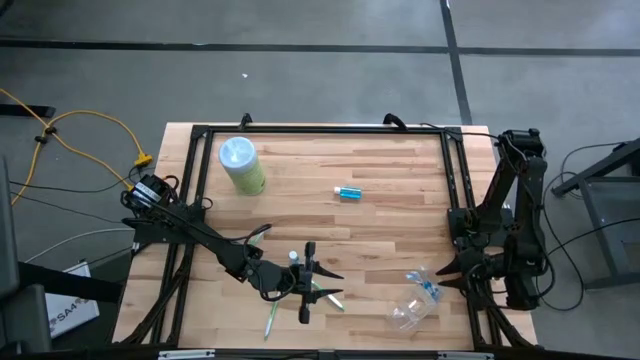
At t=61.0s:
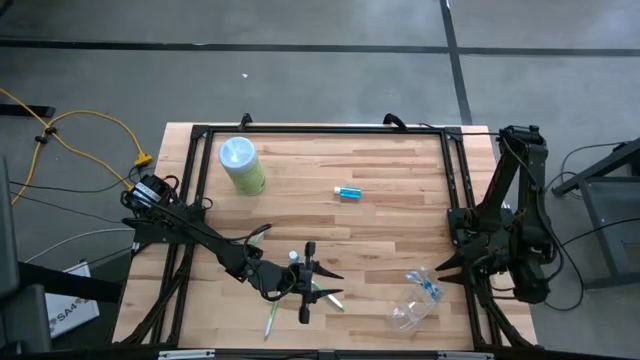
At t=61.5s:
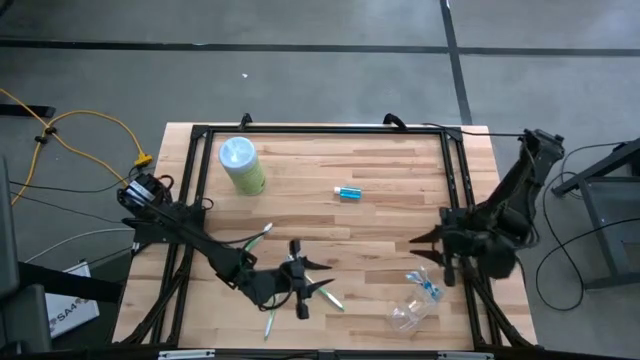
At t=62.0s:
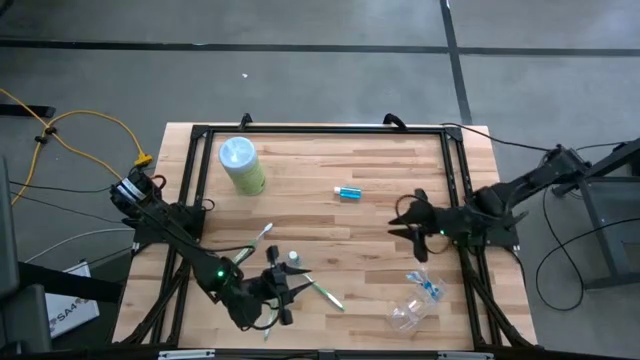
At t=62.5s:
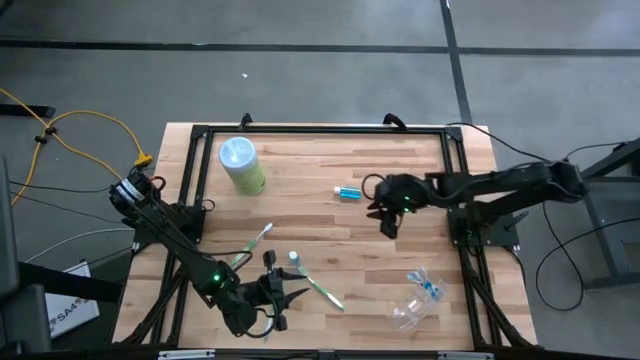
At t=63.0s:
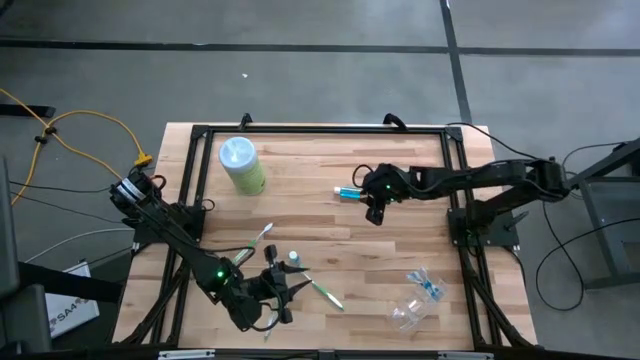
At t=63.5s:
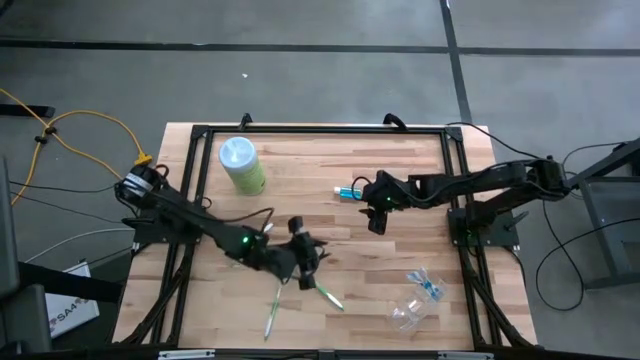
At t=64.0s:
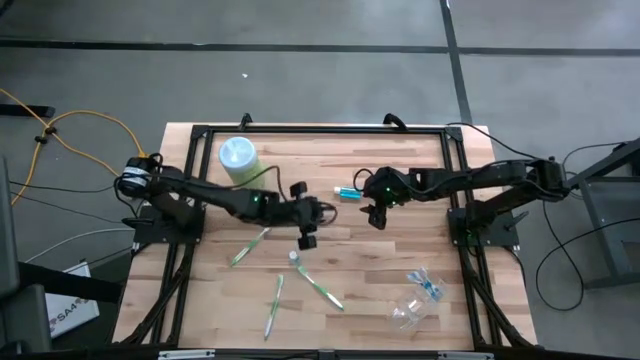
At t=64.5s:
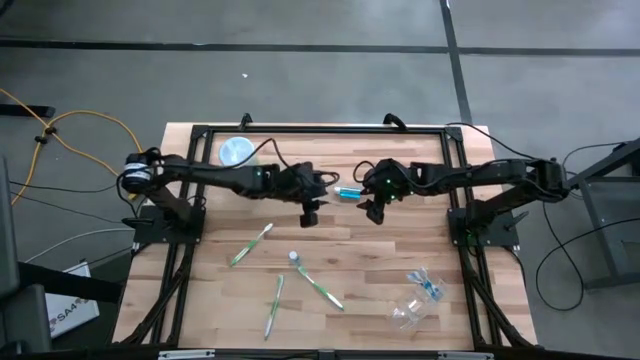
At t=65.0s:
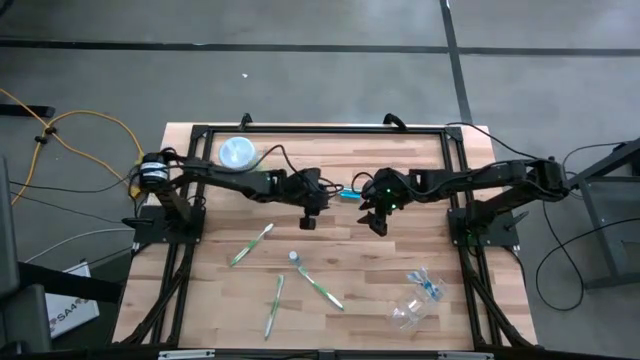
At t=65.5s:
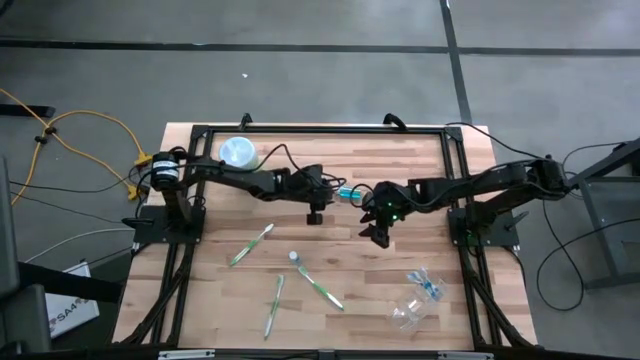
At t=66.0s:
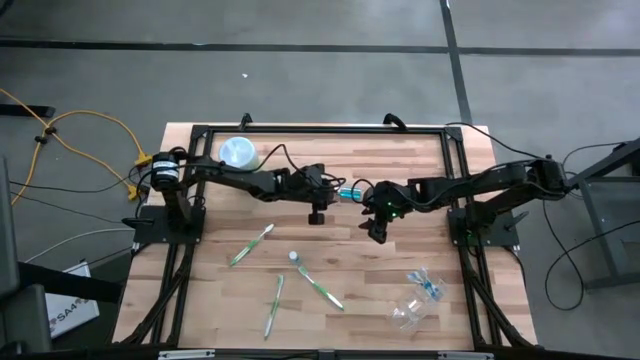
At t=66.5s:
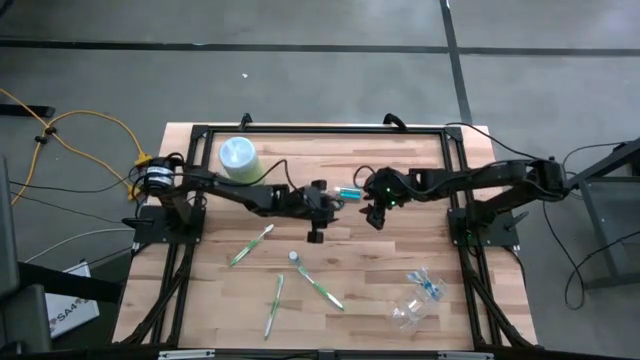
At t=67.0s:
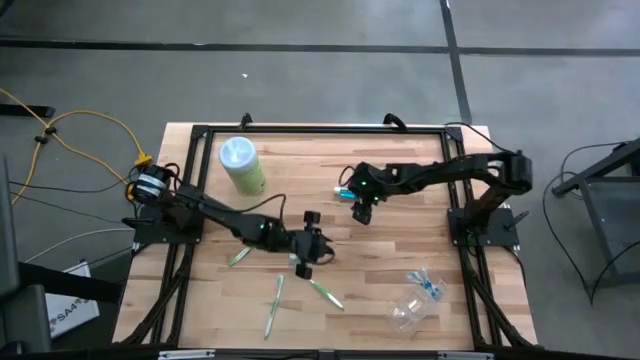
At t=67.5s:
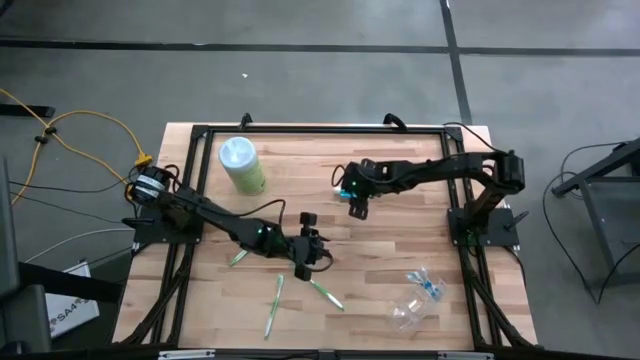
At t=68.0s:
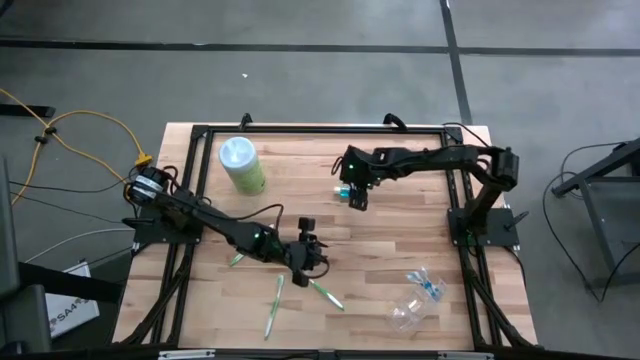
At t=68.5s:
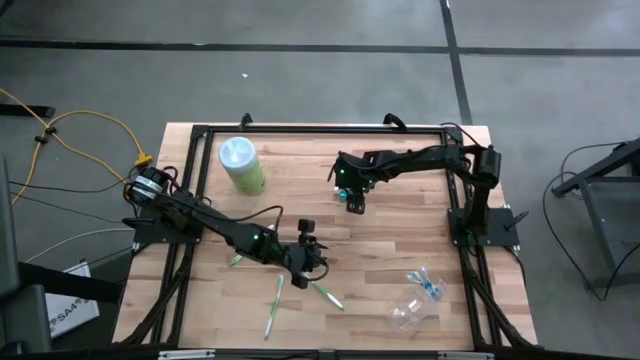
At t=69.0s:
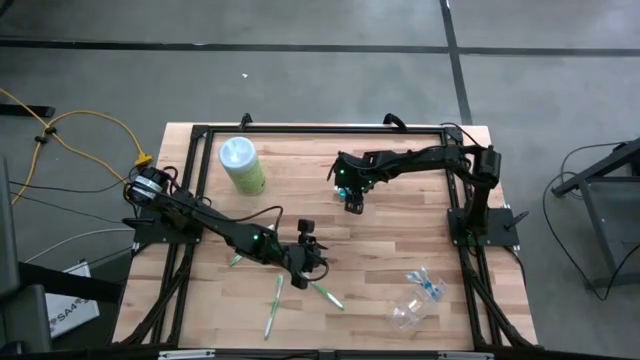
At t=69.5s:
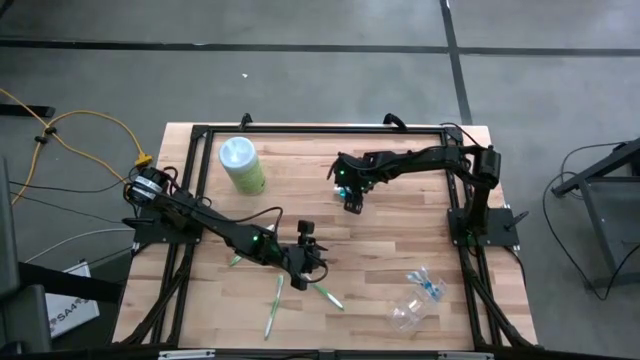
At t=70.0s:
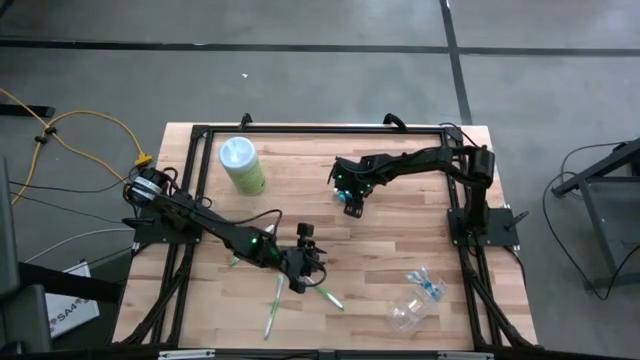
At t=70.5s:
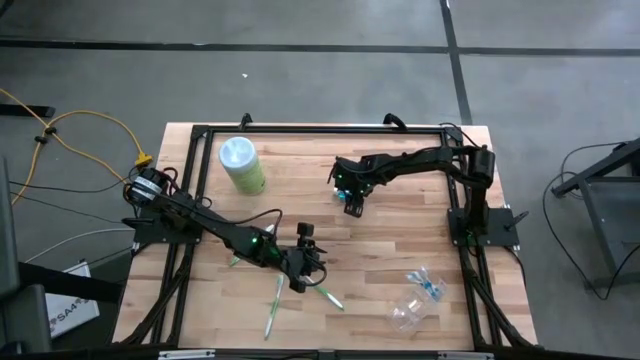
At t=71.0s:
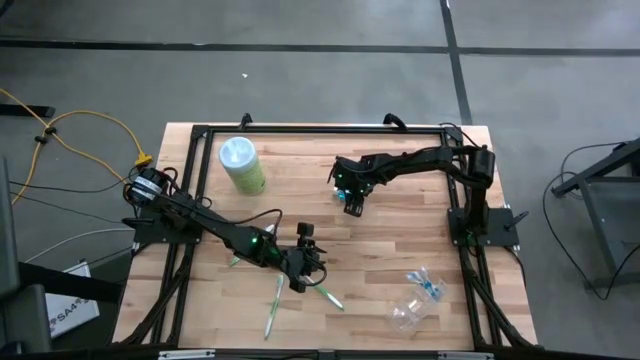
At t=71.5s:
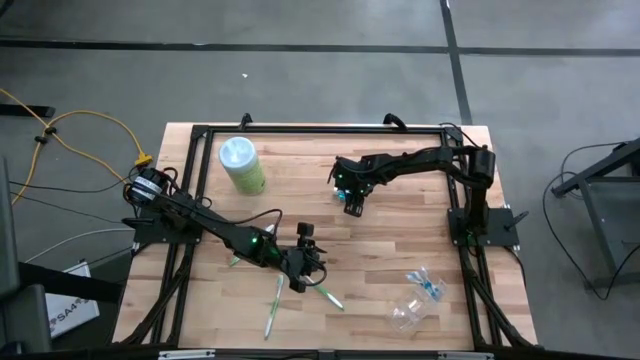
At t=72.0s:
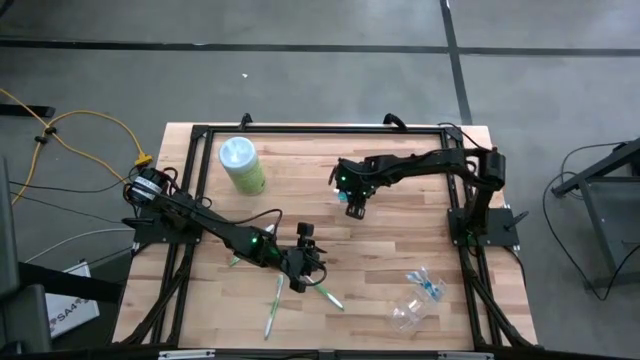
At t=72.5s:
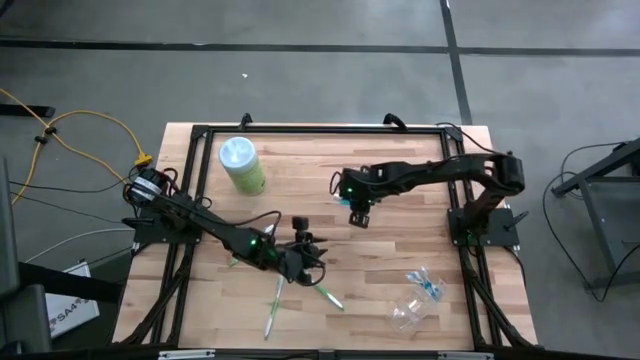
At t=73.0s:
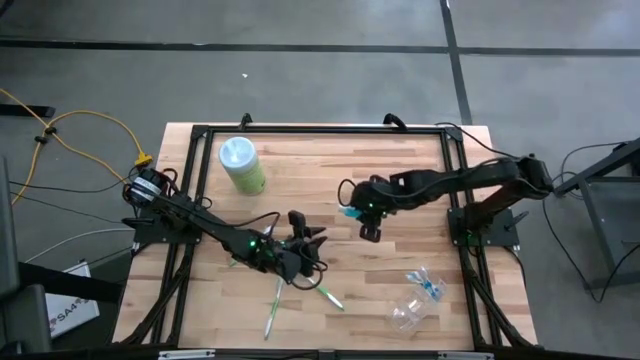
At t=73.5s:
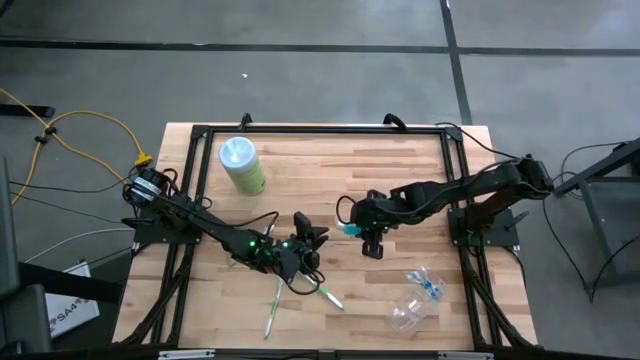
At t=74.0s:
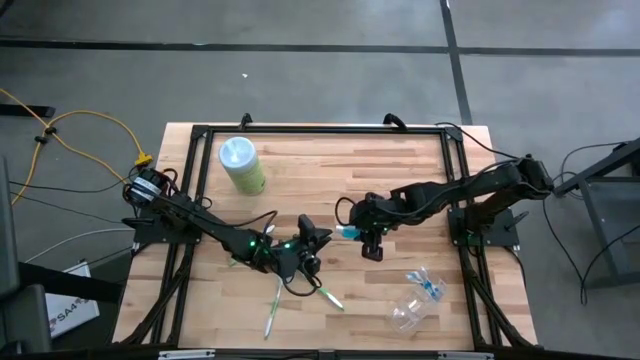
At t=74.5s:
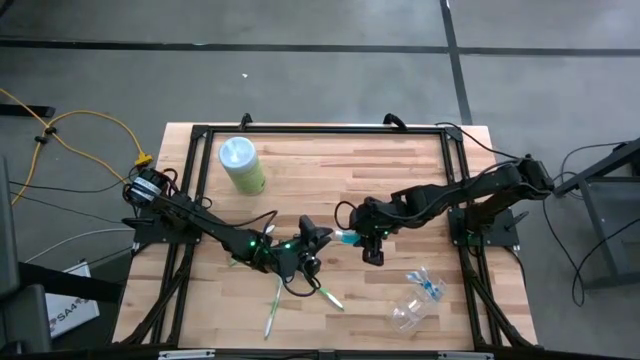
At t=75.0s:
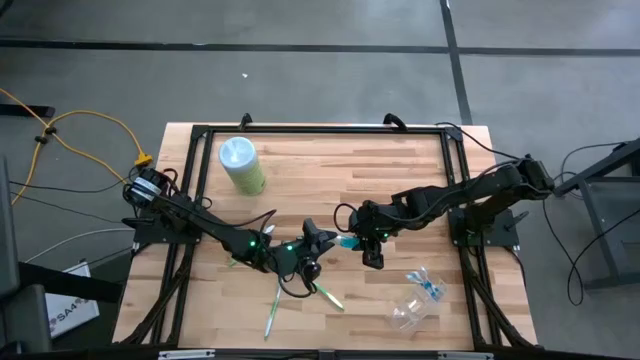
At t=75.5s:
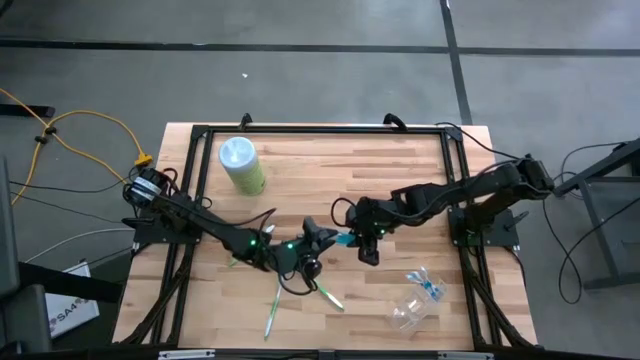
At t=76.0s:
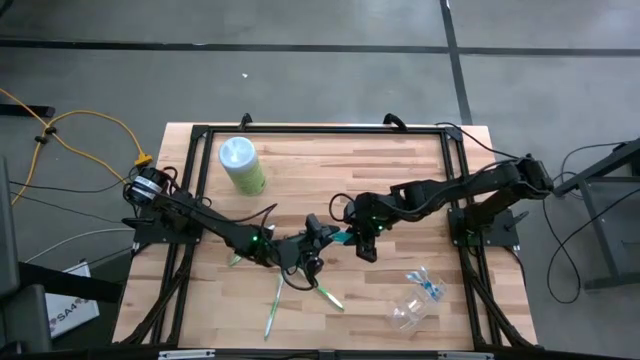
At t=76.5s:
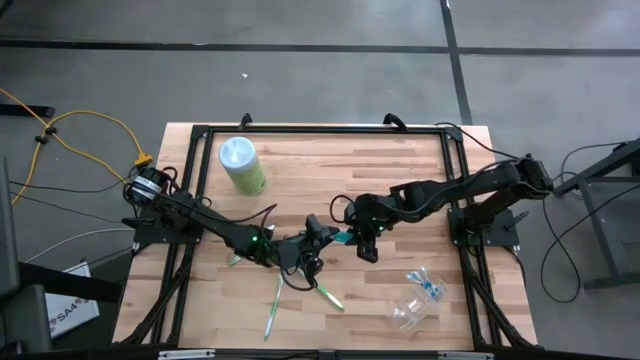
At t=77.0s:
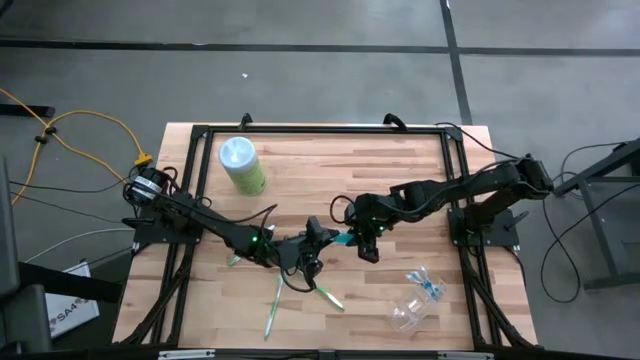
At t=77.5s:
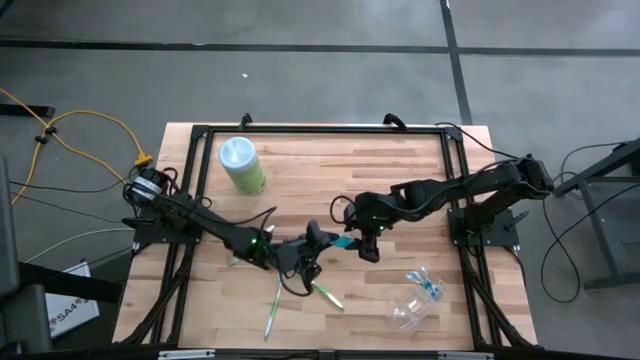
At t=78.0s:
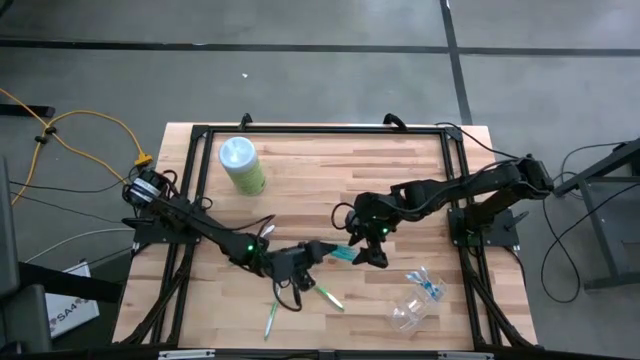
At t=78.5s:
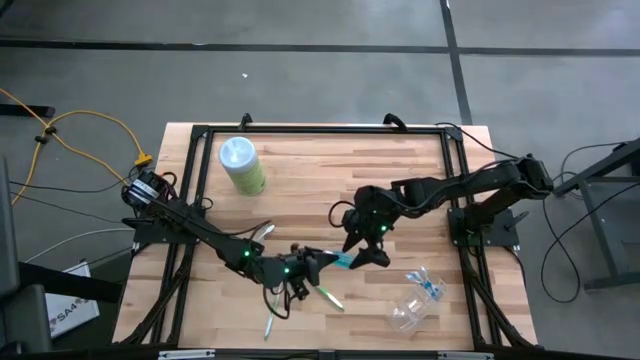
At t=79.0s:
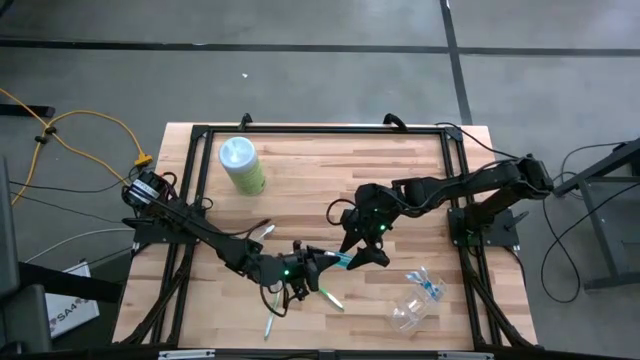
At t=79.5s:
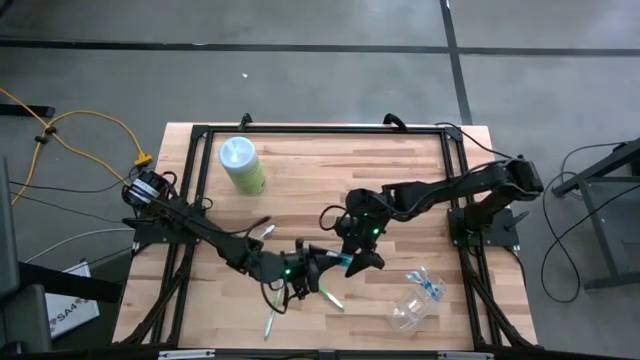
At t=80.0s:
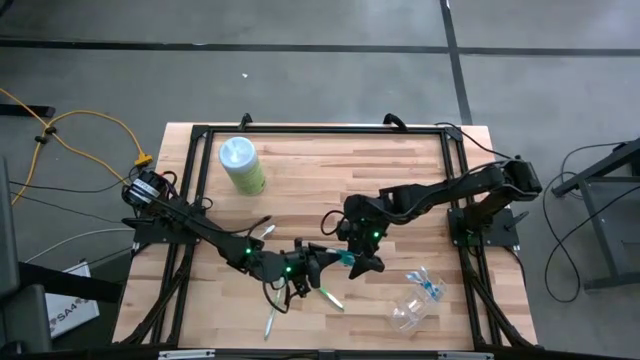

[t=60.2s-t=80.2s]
Task: Pick & Place toothbrushing station
Put the top blue mouthwash bottle into the middle section of the transparent organizer
